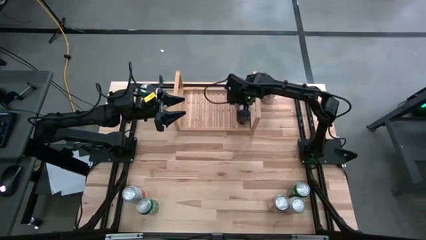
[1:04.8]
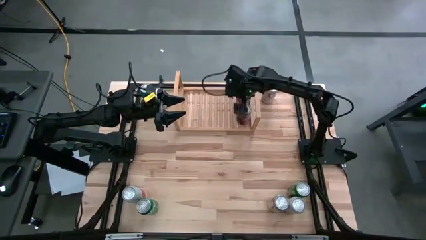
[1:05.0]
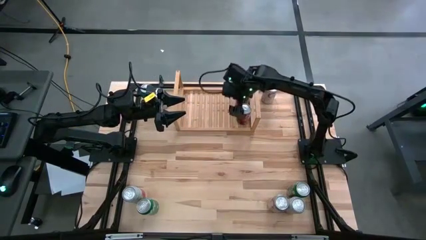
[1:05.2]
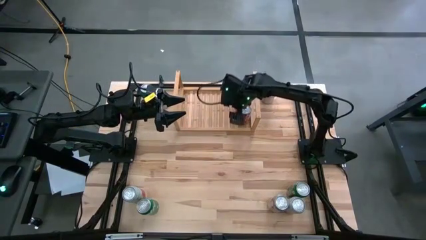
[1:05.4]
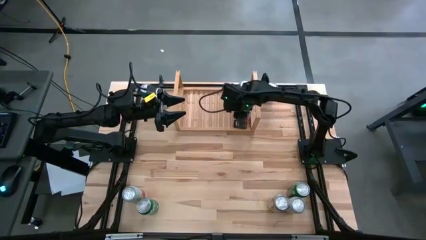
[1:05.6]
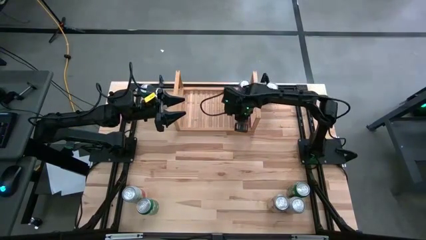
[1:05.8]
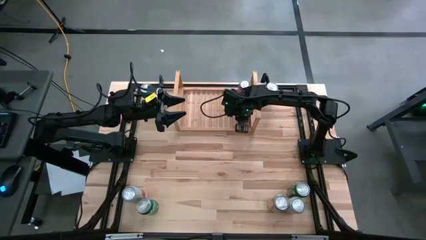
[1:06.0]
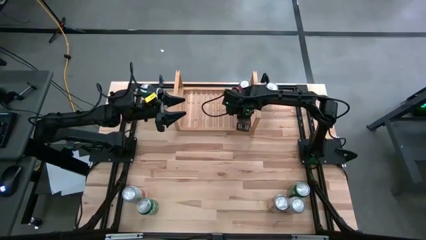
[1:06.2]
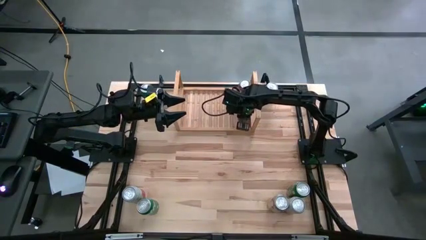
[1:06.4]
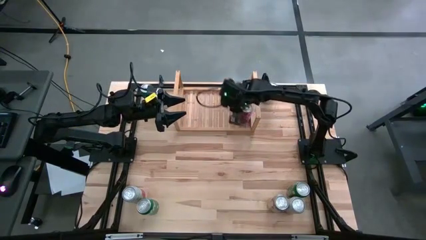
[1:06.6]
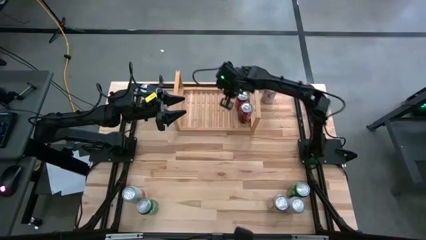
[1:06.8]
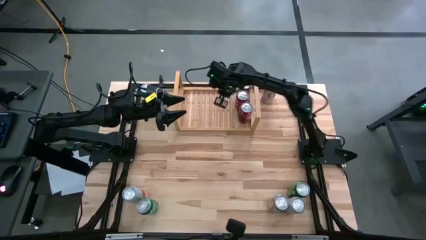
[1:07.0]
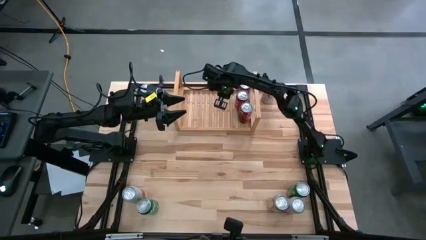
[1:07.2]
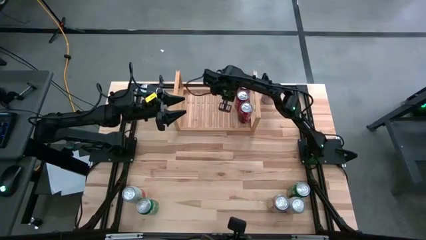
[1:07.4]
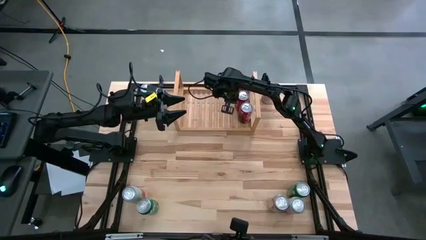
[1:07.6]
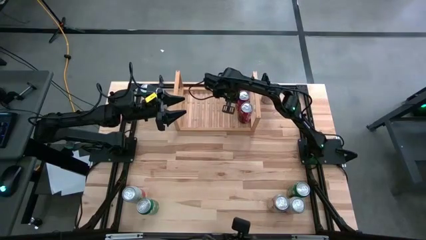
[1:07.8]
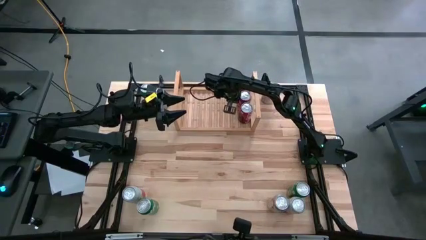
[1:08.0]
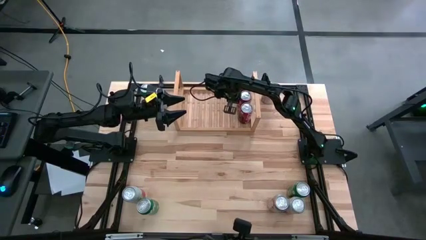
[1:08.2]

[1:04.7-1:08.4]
Task: Place canned beverage on shelf
Adjust the red soda cans on the shelf

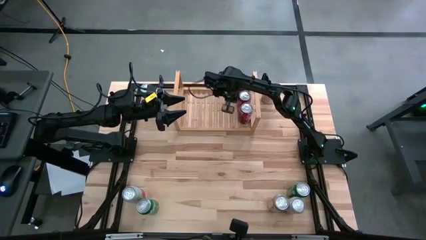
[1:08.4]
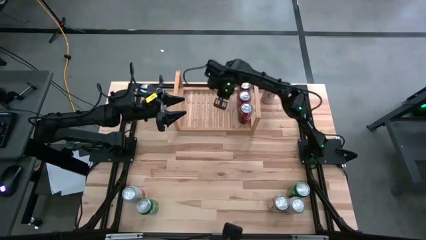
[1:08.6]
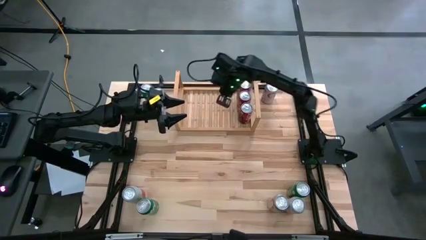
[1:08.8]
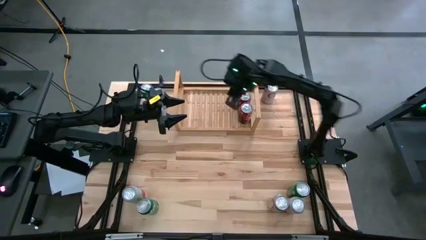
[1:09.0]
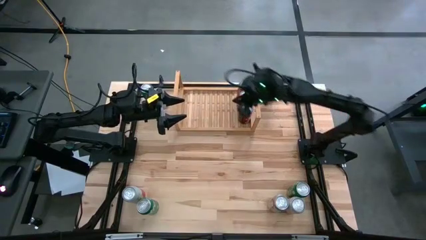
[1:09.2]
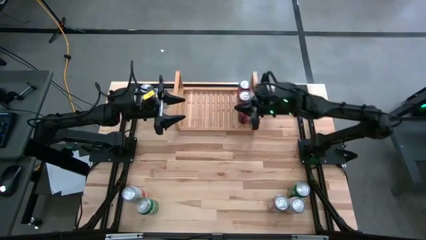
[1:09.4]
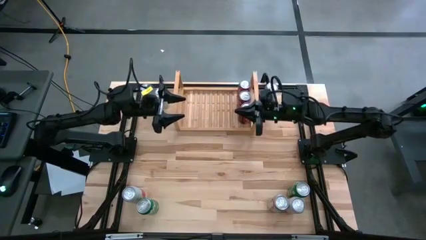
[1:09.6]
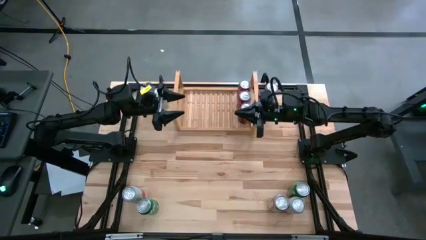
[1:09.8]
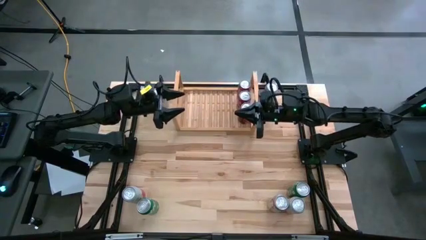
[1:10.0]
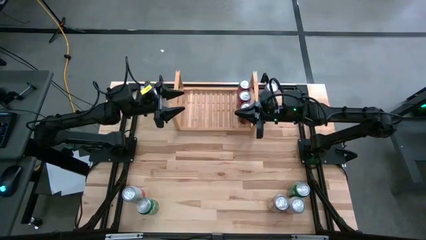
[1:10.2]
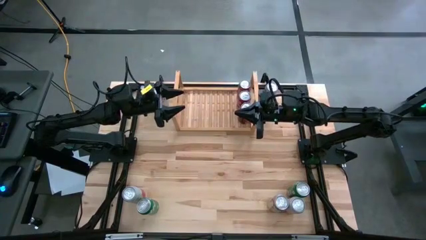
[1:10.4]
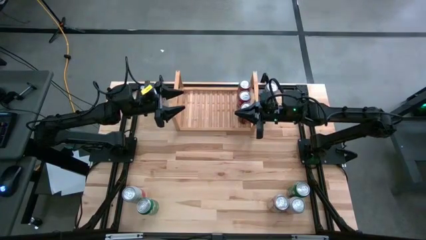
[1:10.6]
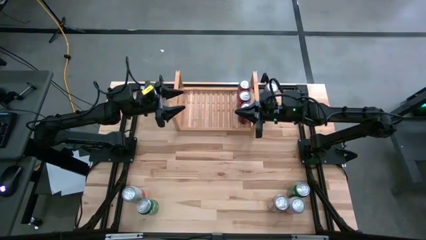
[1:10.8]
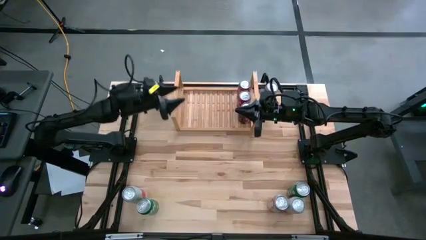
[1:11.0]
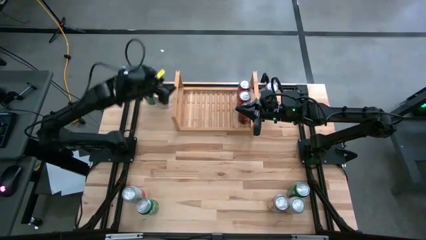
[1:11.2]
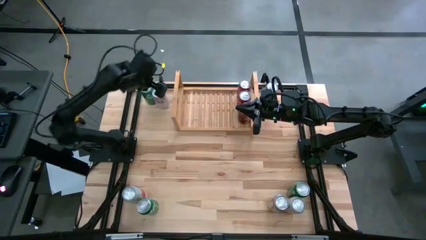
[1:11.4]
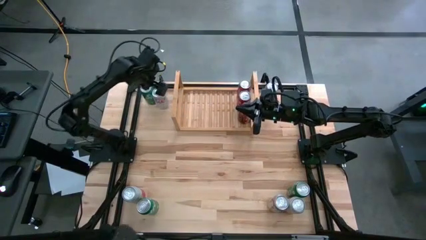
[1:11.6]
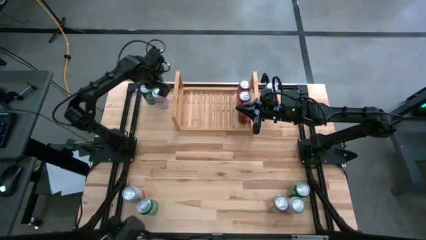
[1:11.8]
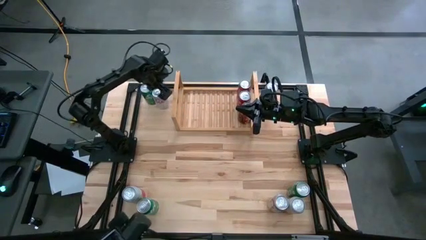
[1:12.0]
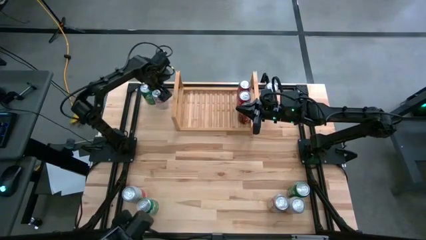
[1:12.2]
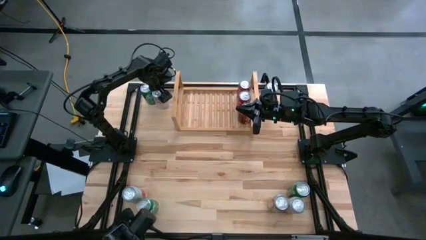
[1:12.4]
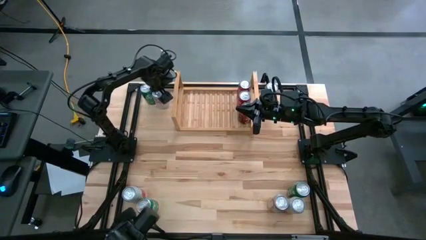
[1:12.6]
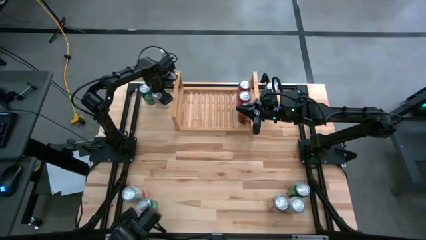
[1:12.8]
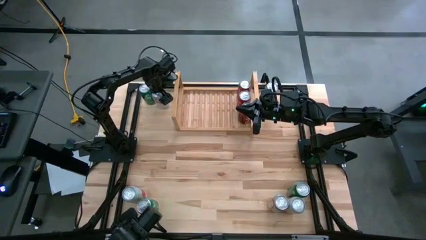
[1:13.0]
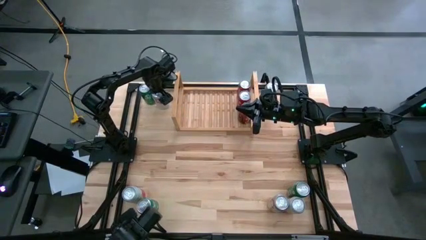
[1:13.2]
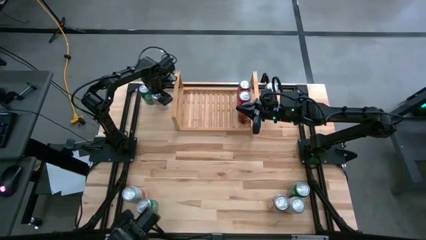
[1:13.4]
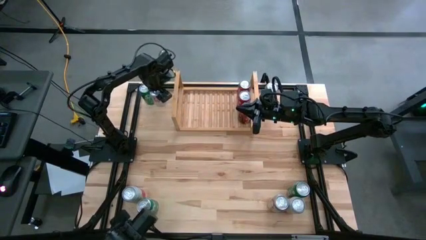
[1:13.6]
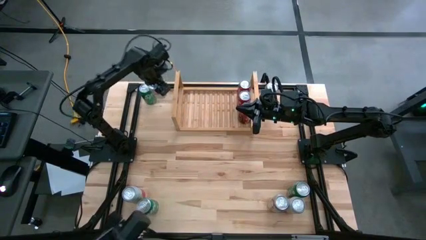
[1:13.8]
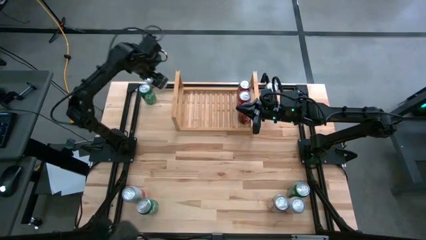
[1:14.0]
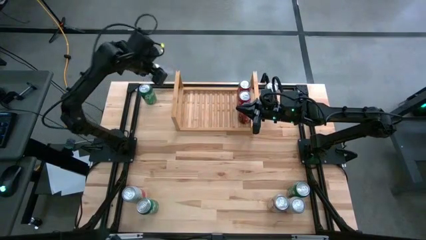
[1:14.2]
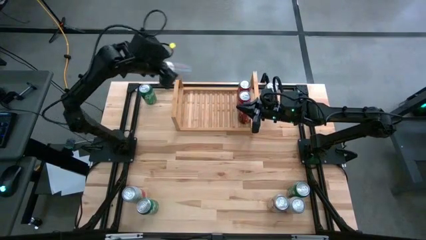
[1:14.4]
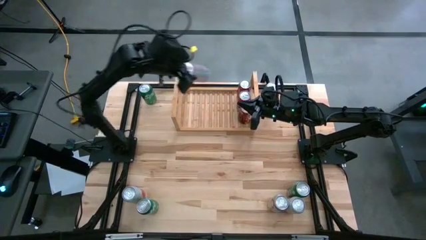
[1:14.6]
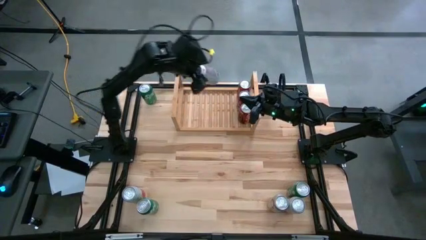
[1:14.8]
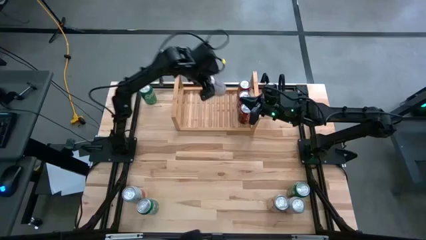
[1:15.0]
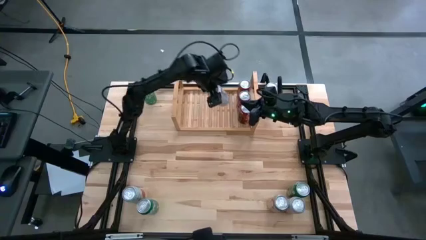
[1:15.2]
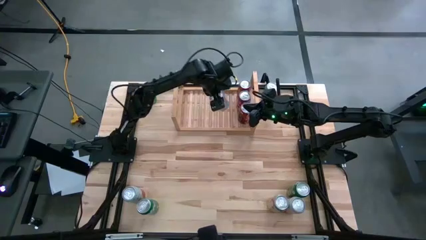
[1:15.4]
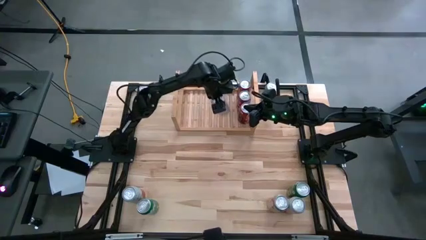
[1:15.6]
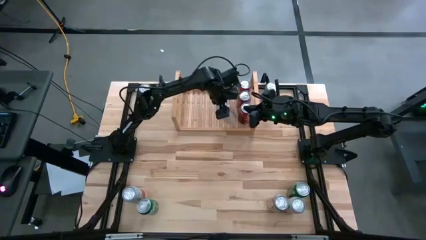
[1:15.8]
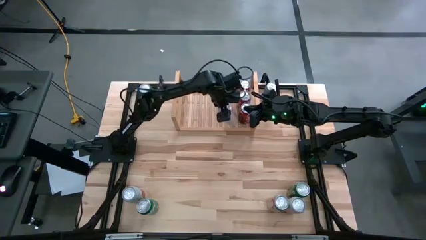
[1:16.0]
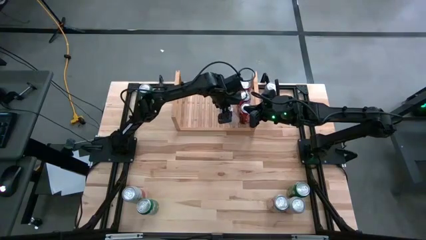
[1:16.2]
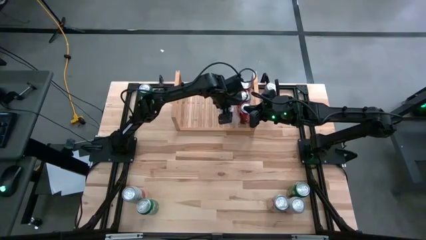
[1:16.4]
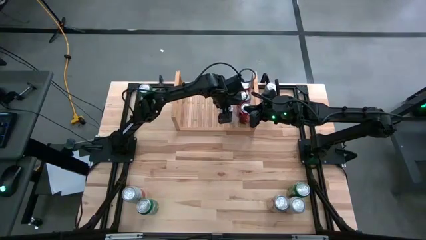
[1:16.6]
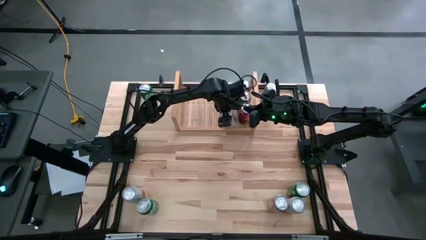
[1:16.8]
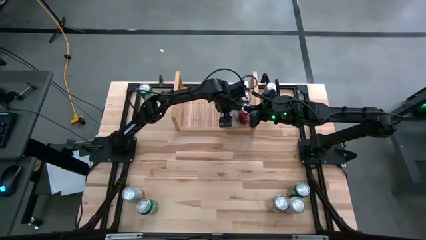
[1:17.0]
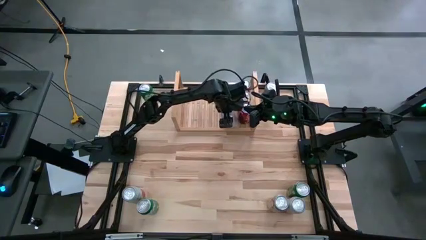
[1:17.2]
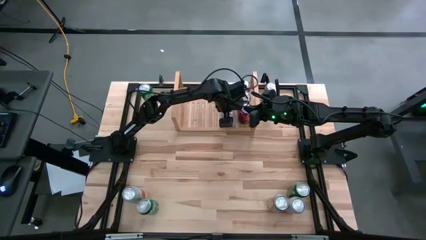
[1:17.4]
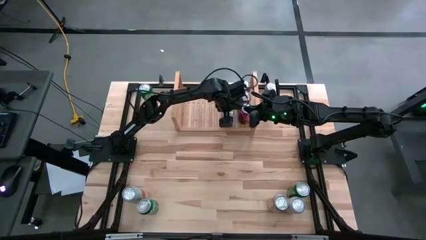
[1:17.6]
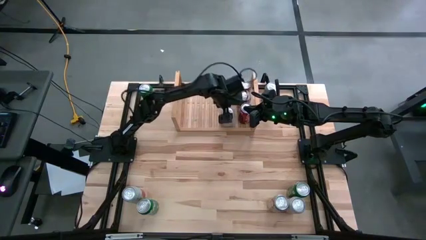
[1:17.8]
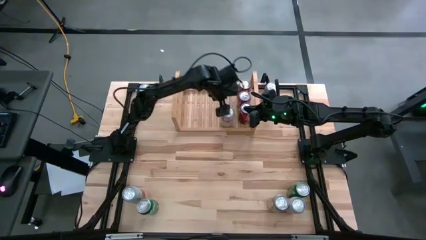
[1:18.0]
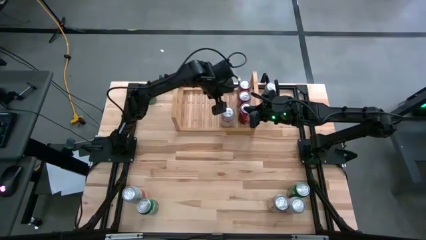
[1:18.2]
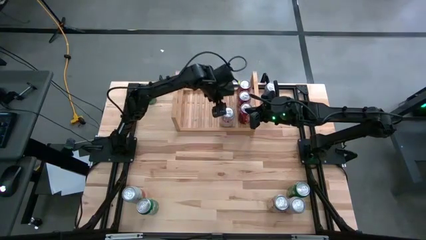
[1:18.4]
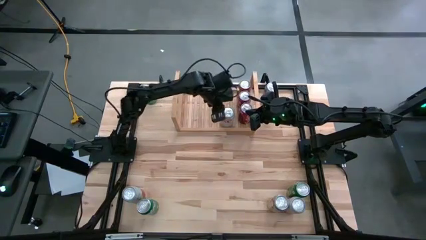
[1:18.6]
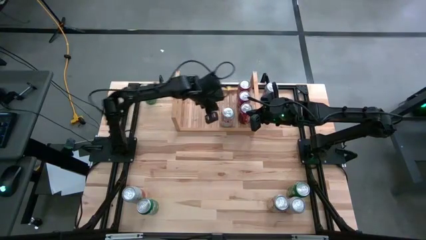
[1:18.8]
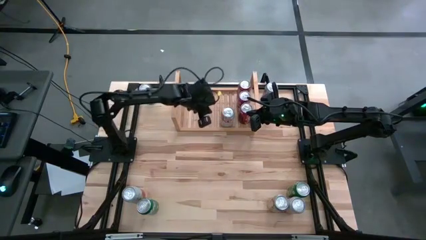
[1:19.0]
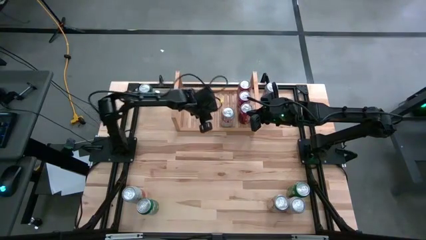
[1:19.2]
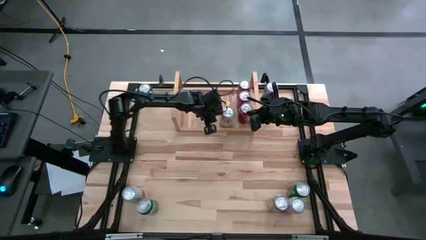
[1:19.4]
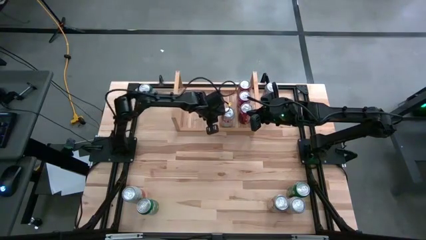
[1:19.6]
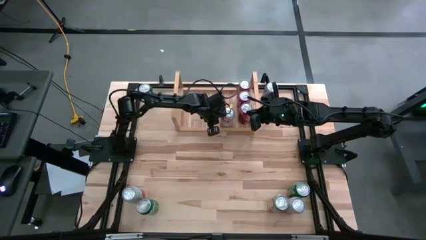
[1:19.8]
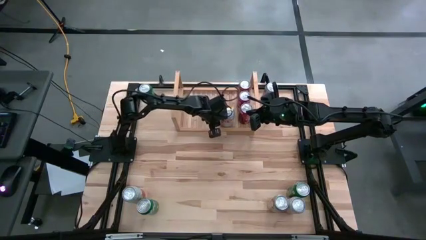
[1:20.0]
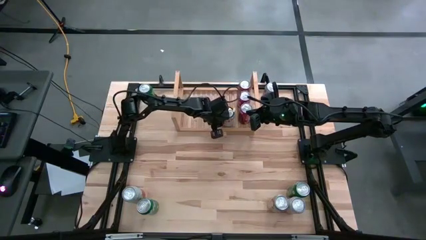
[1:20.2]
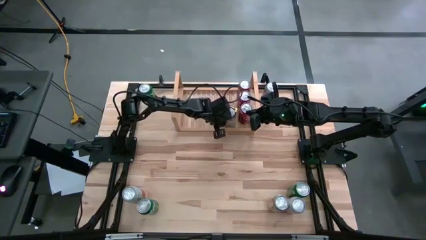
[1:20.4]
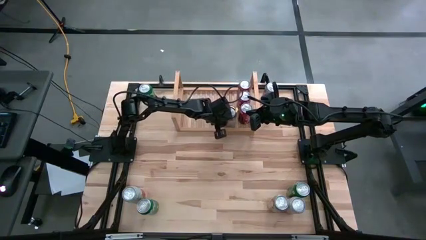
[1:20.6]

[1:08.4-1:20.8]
Put the top left red-silver soda can on the shelf
